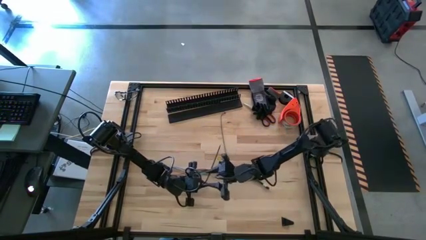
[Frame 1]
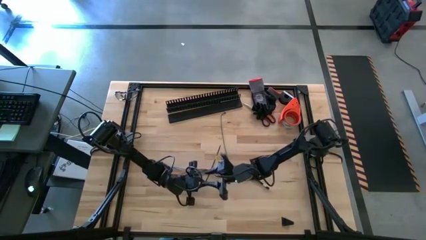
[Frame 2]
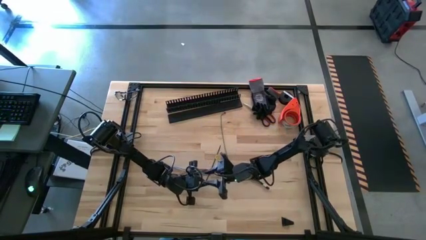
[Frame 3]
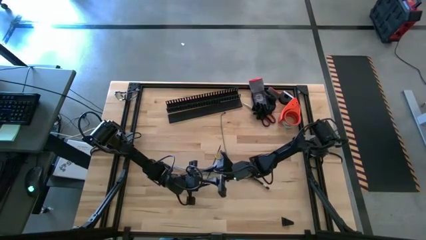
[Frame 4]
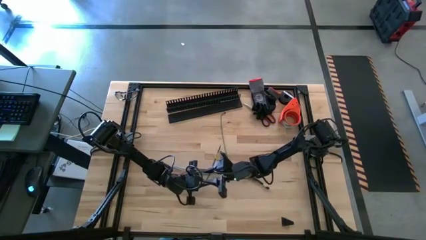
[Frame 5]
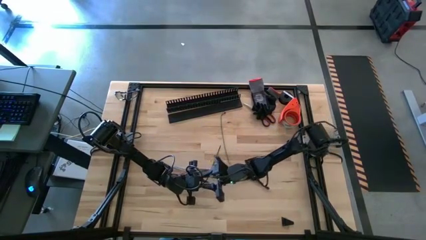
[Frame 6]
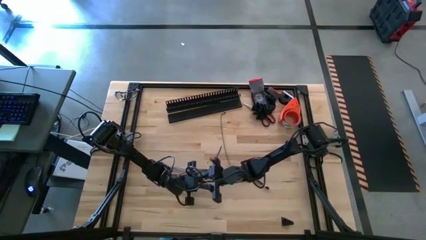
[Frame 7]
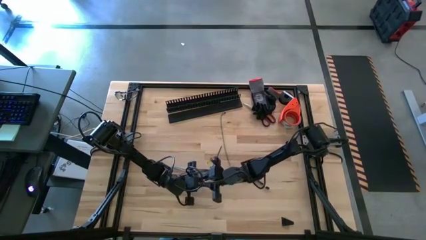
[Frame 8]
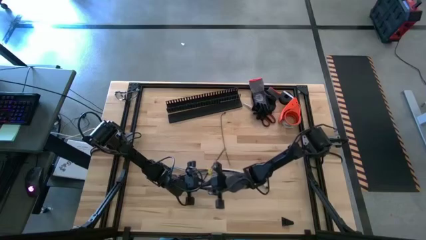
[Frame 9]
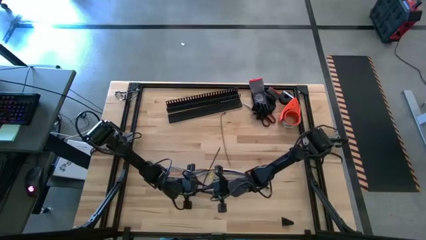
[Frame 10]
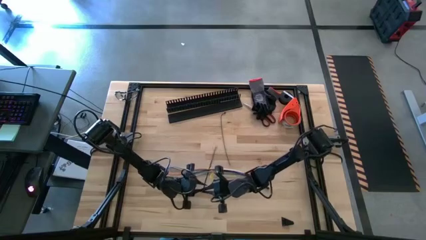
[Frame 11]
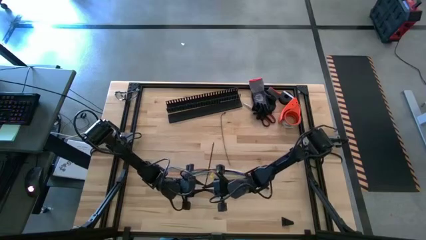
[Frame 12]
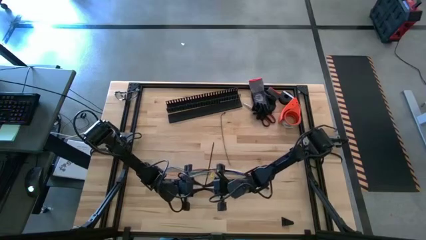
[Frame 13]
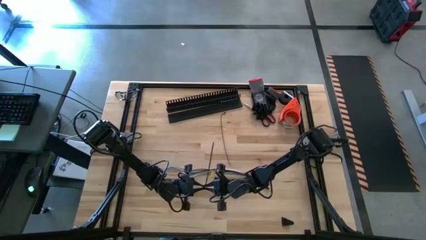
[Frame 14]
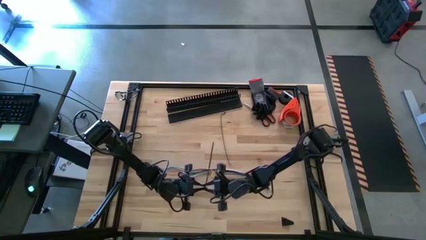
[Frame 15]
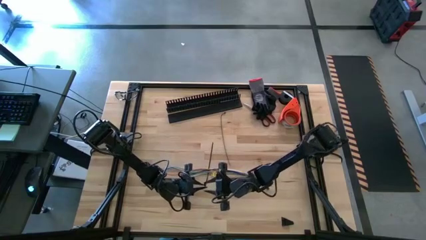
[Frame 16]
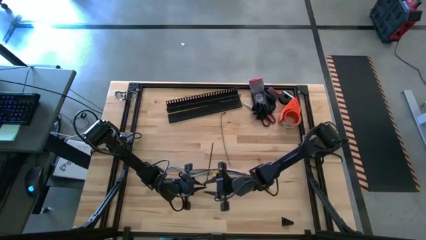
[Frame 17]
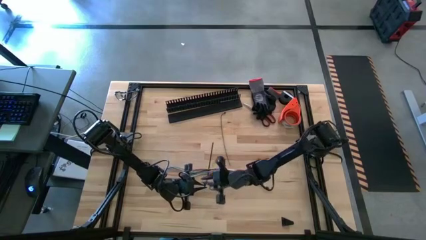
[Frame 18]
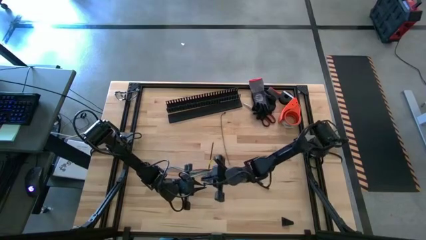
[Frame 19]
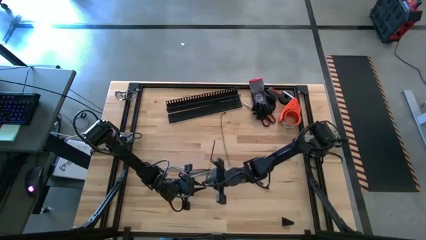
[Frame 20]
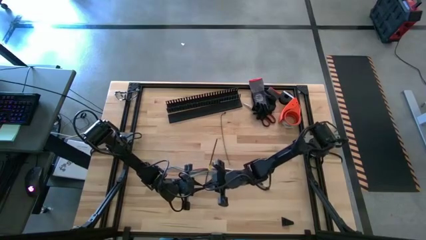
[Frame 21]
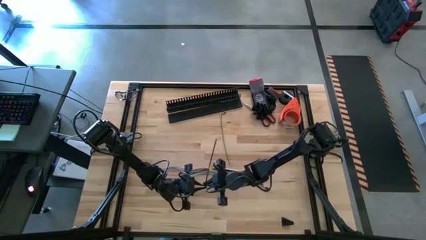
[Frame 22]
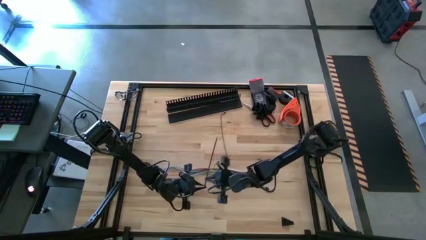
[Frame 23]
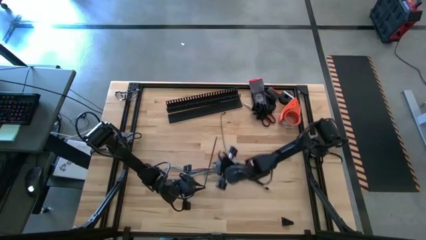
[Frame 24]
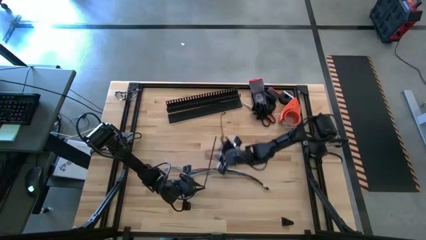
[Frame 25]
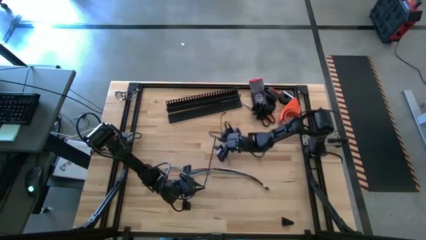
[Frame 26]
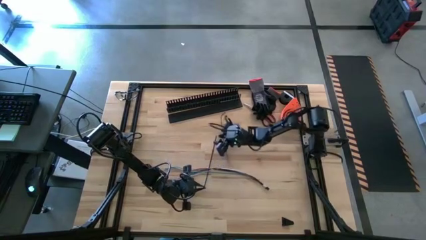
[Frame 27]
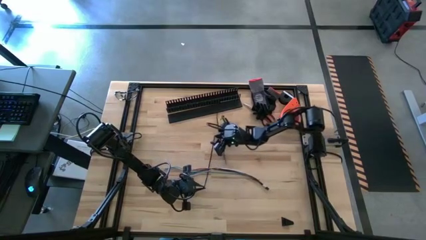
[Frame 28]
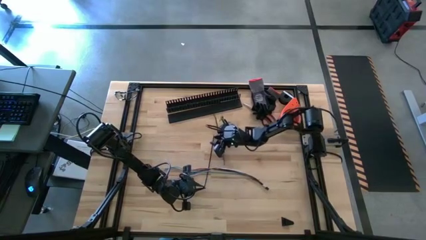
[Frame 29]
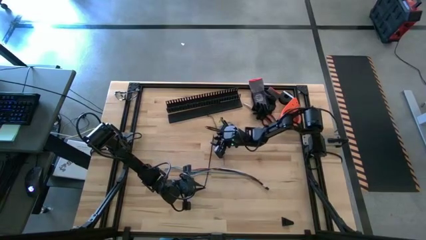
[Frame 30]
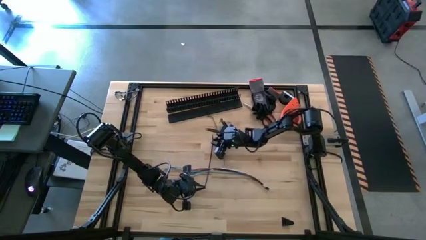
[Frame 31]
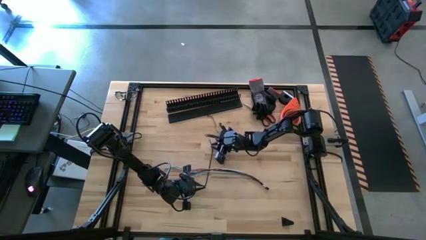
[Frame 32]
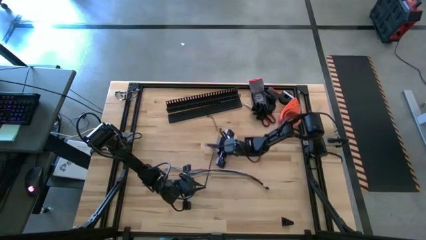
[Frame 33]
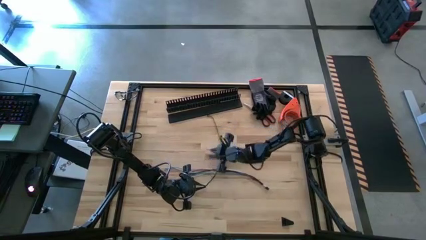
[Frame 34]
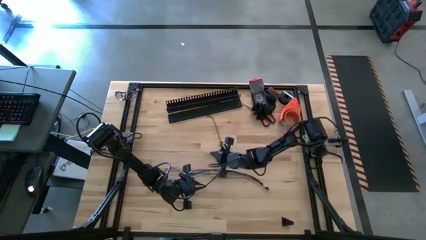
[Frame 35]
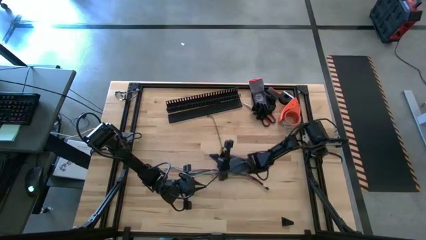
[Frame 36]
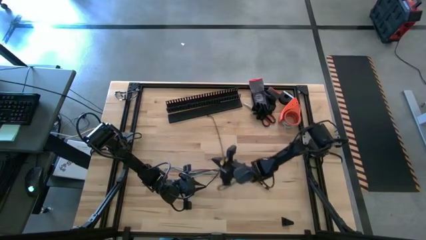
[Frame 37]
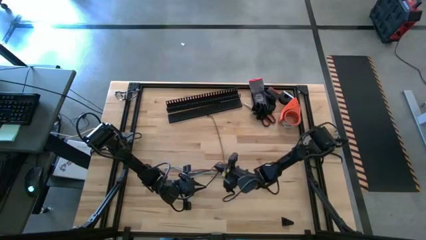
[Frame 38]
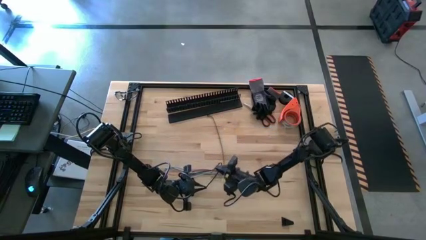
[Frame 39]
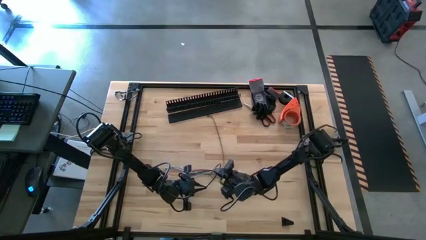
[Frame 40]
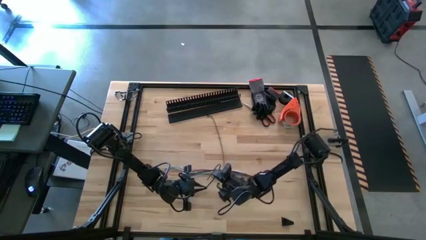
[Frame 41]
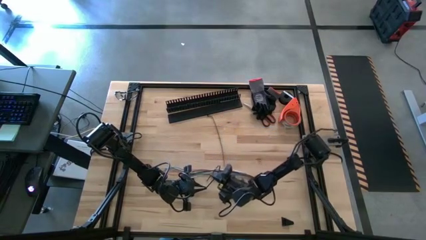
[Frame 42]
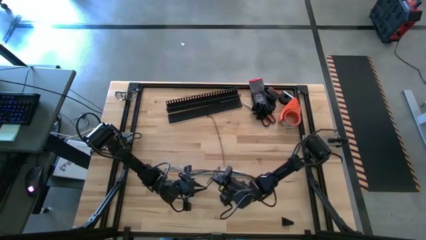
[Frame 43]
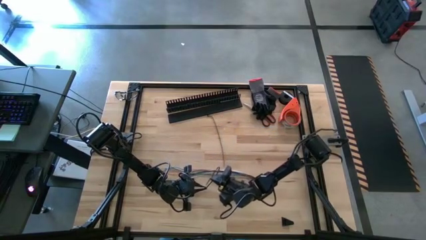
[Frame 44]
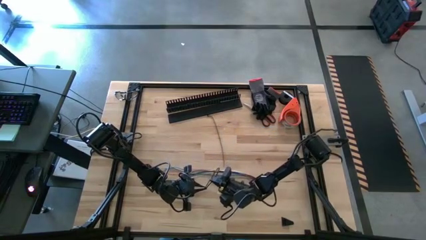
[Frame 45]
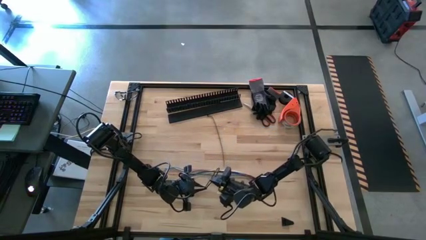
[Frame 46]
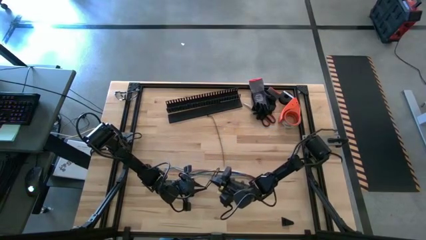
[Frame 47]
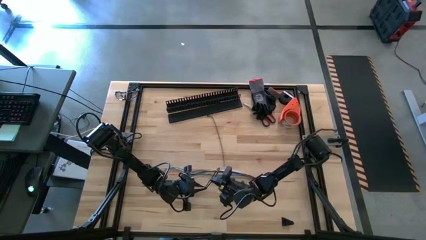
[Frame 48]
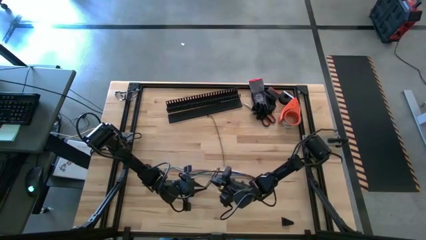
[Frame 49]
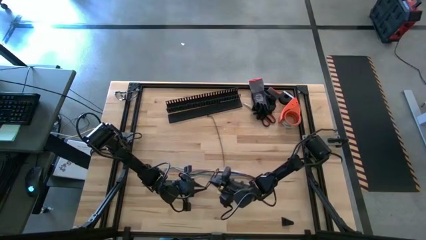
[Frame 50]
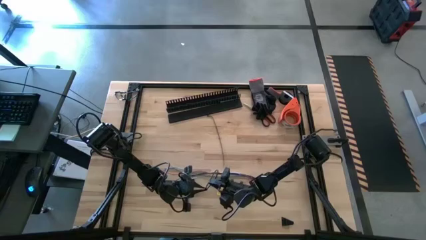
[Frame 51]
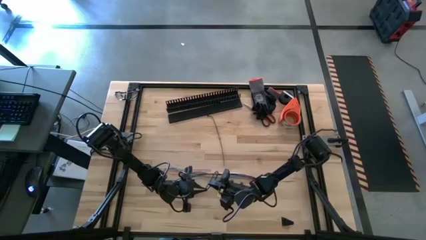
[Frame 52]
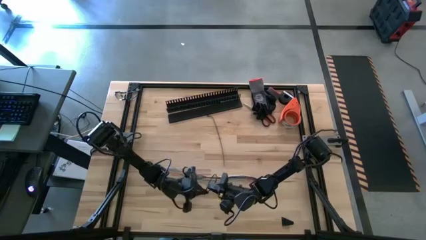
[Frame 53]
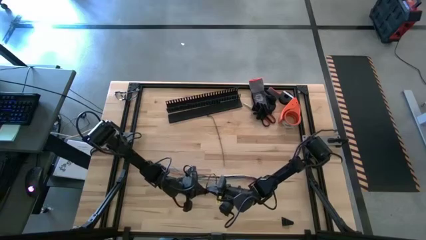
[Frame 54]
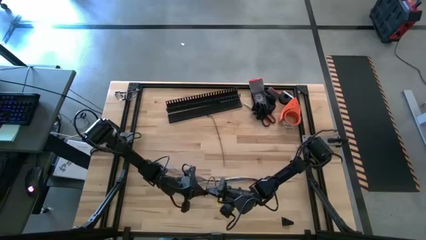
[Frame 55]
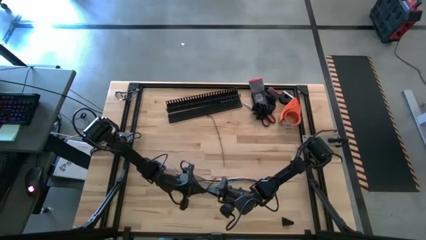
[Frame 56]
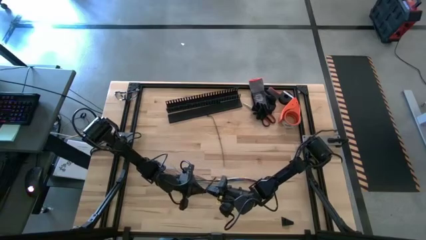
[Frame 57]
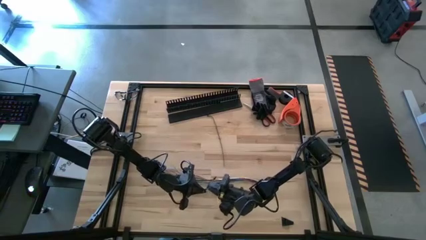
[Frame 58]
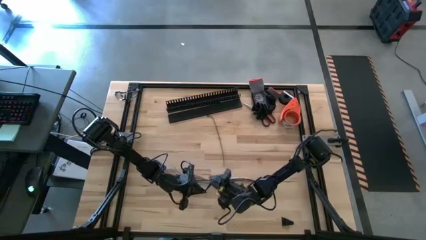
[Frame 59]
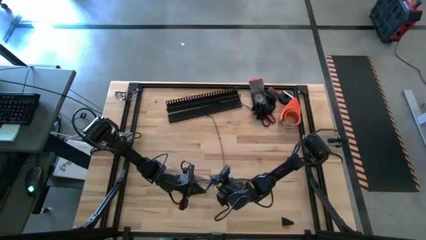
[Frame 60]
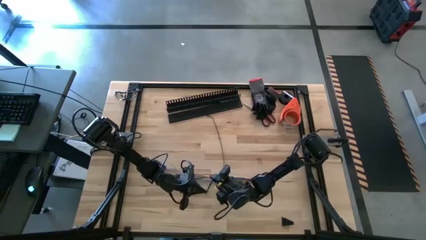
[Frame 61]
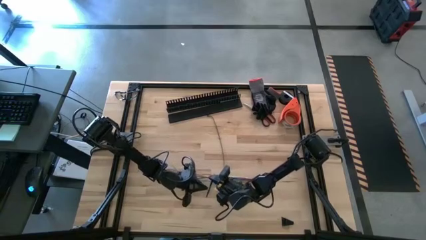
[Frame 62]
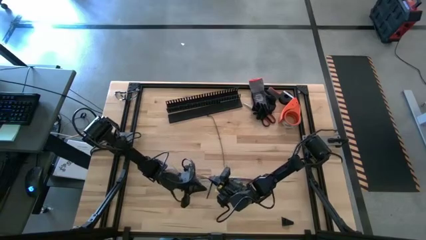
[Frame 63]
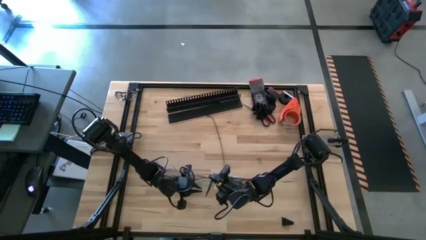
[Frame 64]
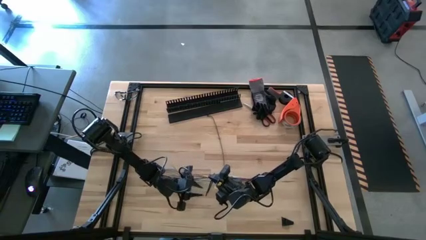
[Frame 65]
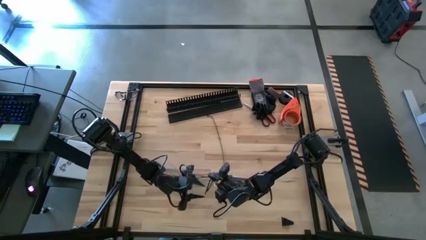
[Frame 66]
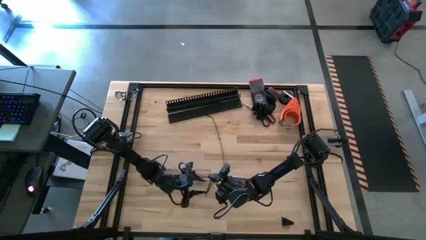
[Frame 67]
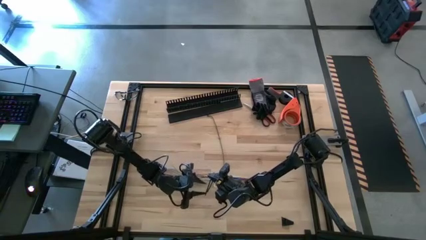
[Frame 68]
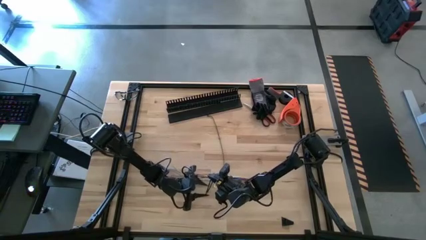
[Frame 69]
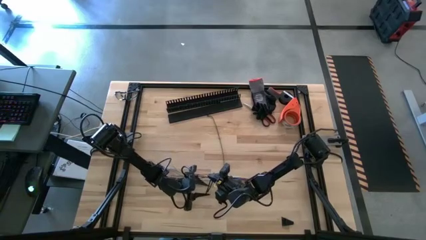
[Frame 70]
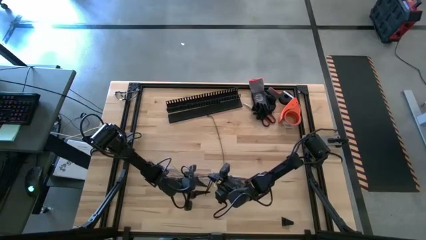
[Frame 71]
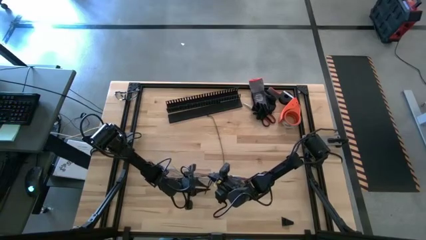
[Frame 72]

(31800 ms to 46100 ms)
Task: Ziptie cables
Wrap the top black zip tie around the colored cable bundle
